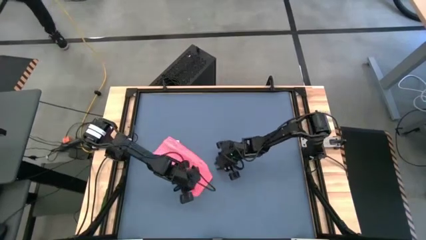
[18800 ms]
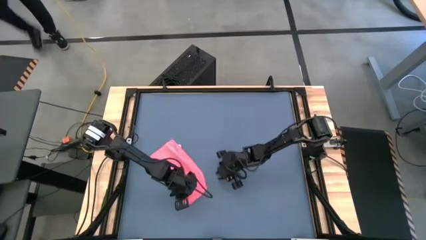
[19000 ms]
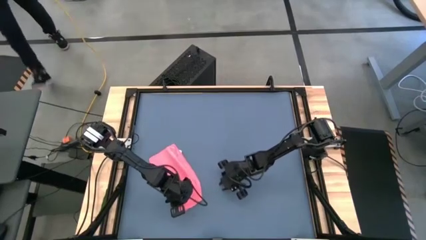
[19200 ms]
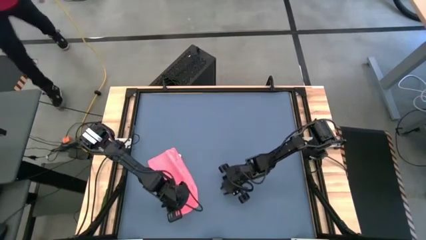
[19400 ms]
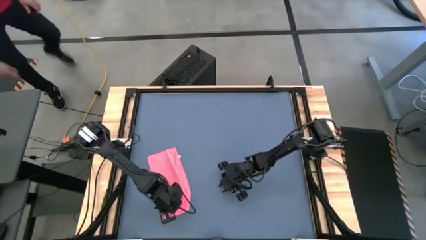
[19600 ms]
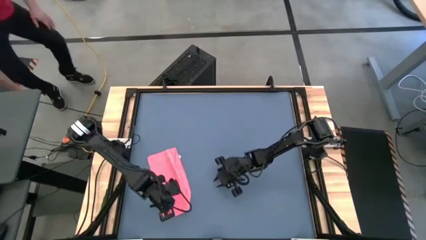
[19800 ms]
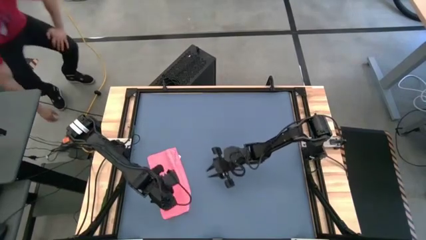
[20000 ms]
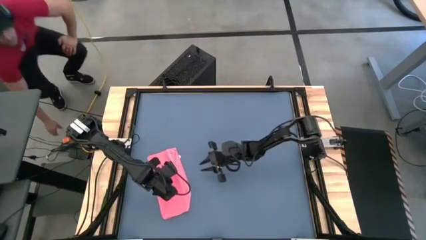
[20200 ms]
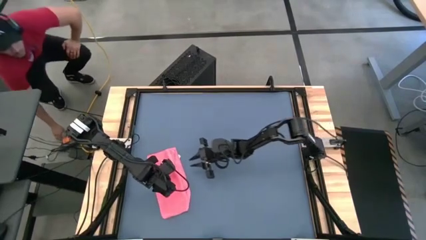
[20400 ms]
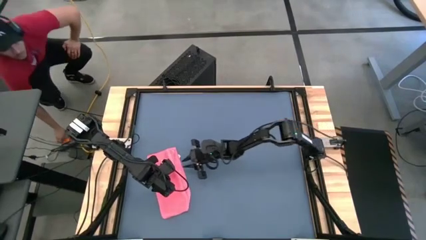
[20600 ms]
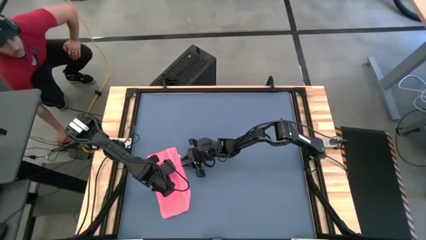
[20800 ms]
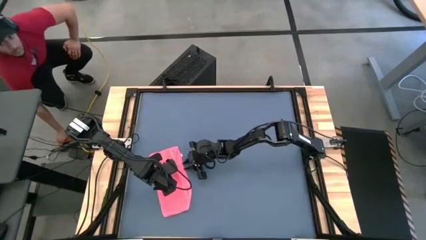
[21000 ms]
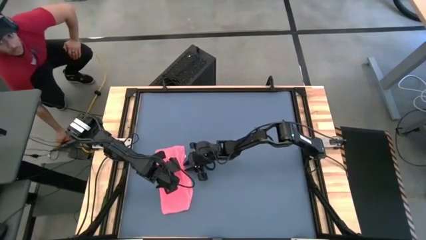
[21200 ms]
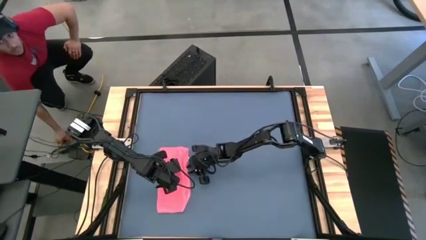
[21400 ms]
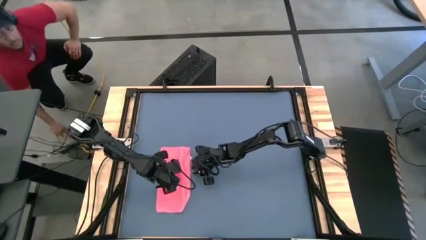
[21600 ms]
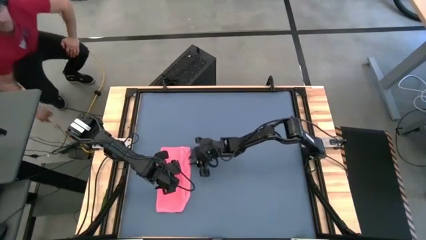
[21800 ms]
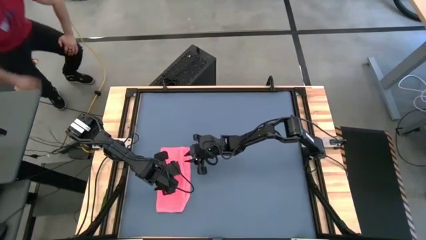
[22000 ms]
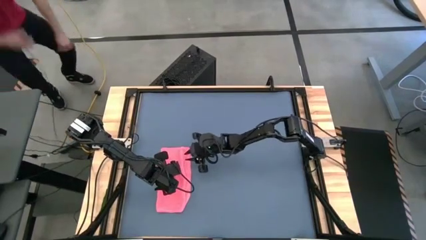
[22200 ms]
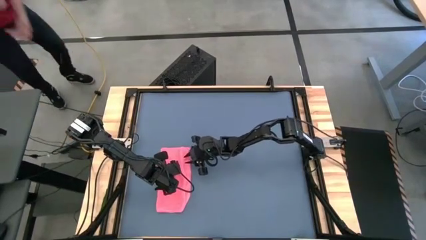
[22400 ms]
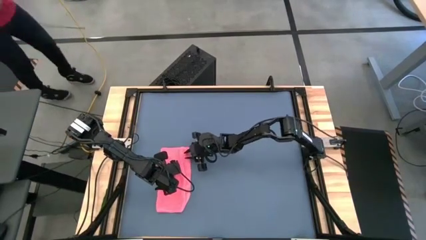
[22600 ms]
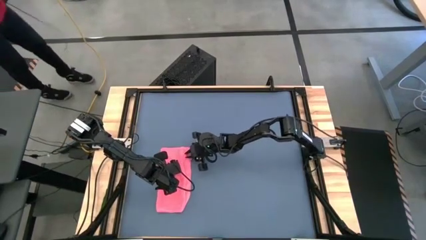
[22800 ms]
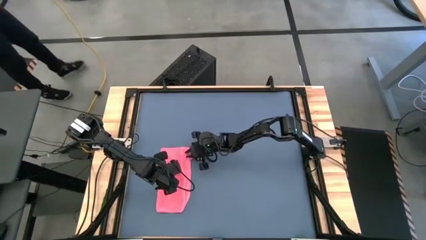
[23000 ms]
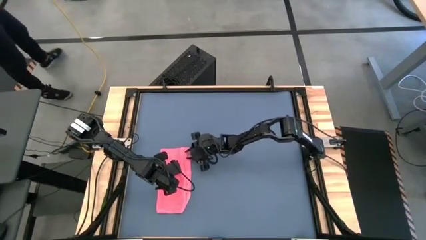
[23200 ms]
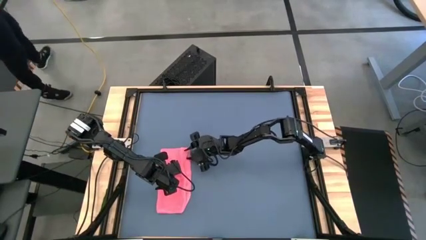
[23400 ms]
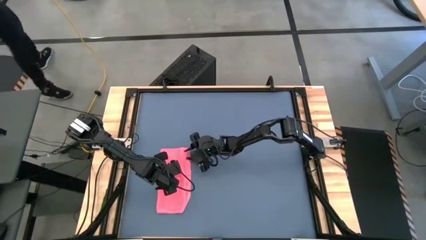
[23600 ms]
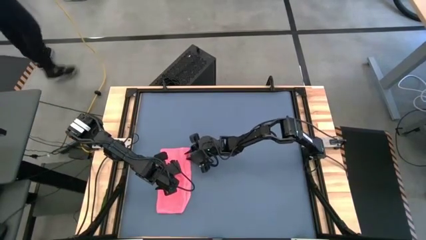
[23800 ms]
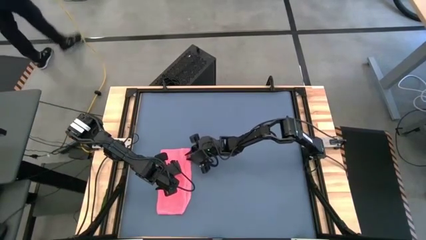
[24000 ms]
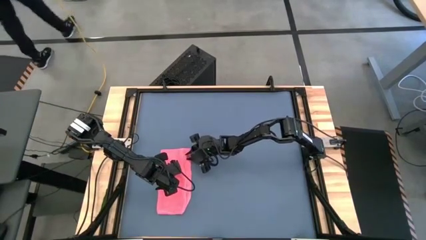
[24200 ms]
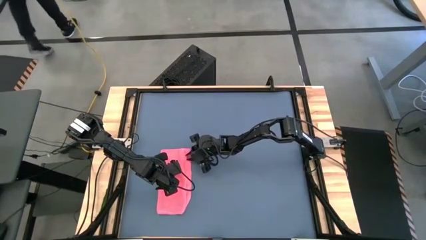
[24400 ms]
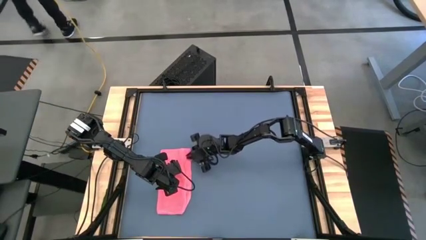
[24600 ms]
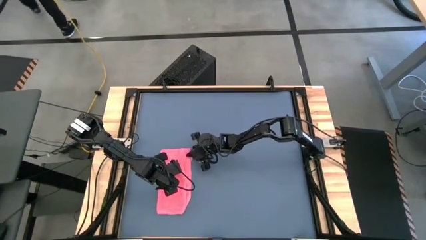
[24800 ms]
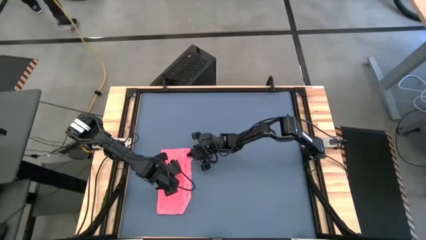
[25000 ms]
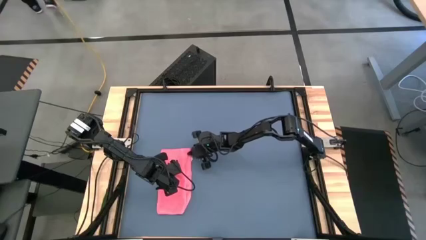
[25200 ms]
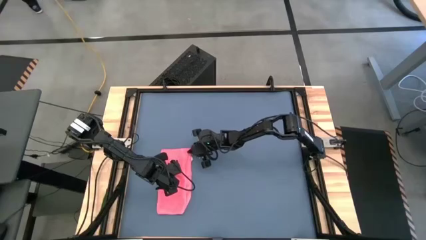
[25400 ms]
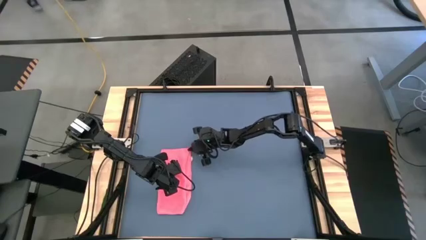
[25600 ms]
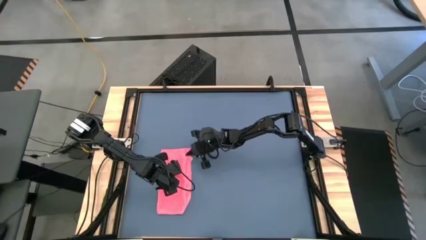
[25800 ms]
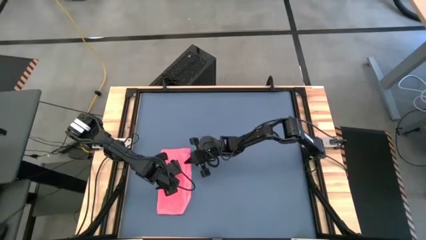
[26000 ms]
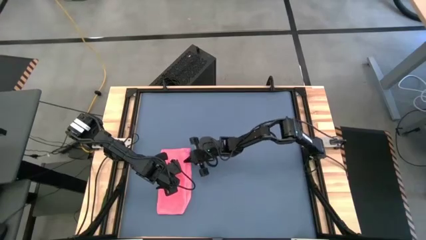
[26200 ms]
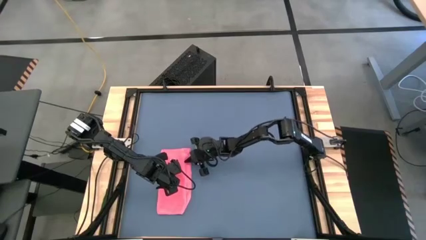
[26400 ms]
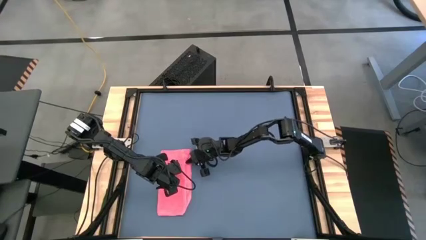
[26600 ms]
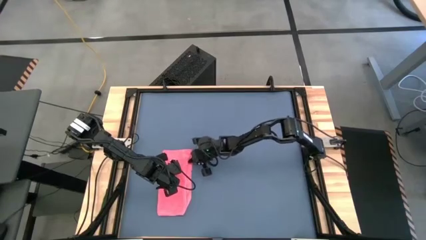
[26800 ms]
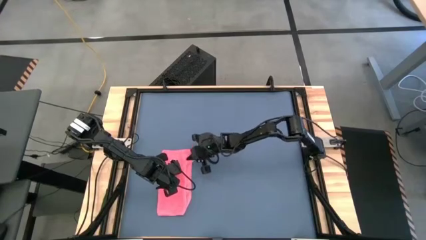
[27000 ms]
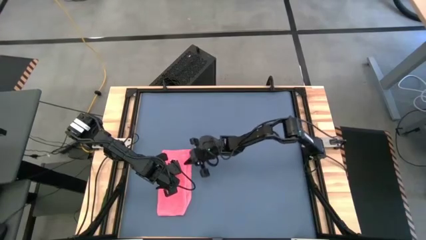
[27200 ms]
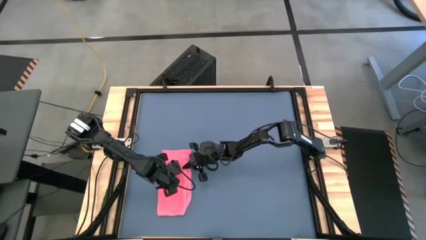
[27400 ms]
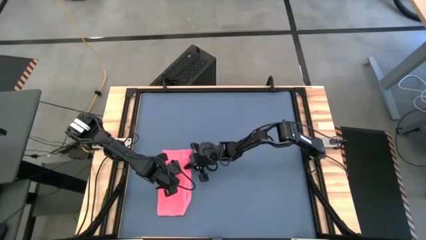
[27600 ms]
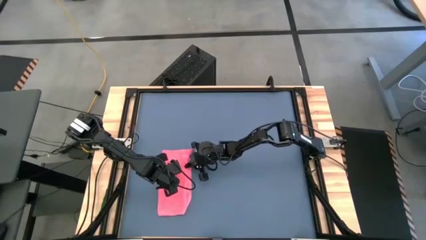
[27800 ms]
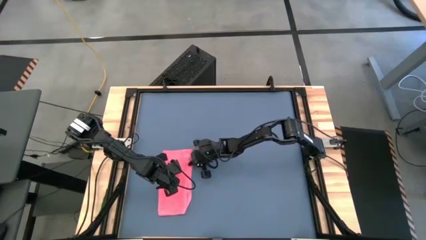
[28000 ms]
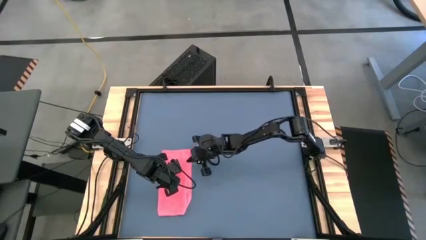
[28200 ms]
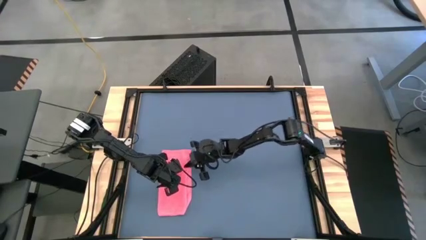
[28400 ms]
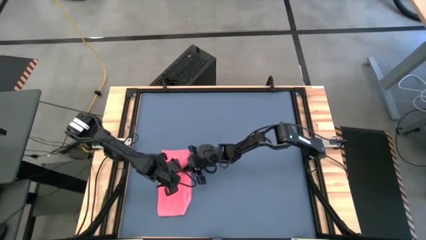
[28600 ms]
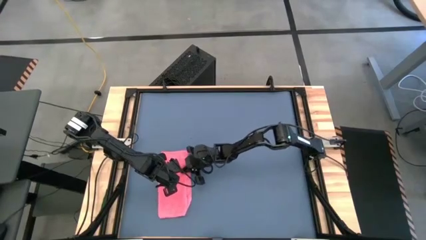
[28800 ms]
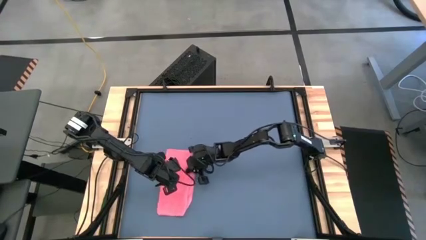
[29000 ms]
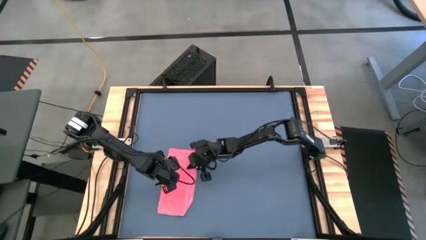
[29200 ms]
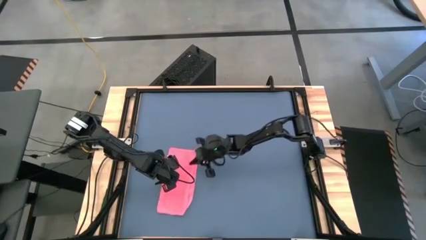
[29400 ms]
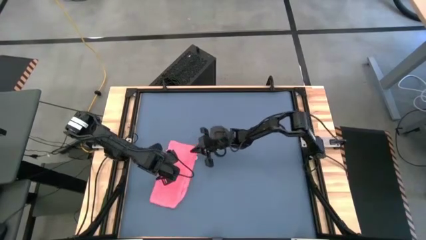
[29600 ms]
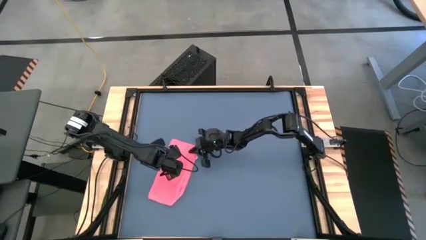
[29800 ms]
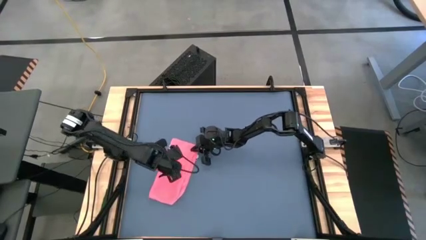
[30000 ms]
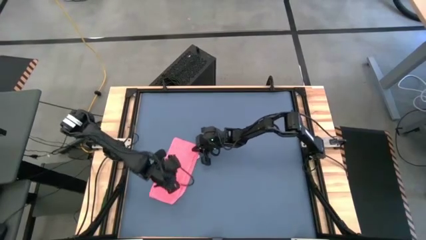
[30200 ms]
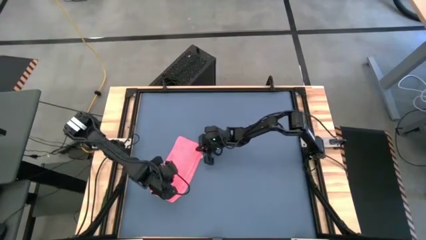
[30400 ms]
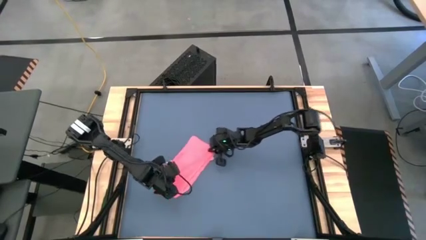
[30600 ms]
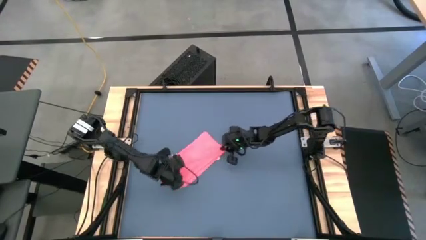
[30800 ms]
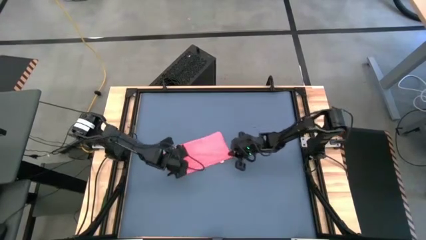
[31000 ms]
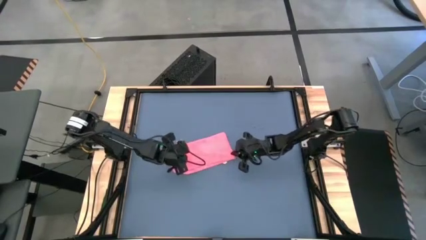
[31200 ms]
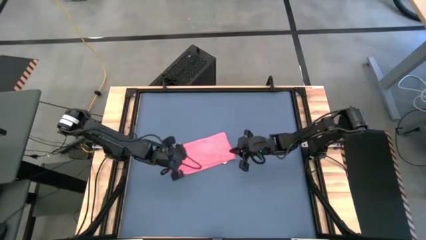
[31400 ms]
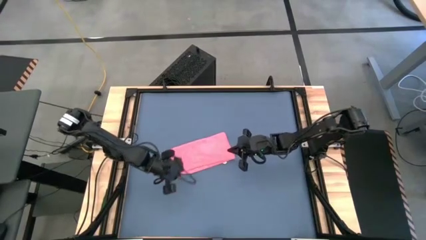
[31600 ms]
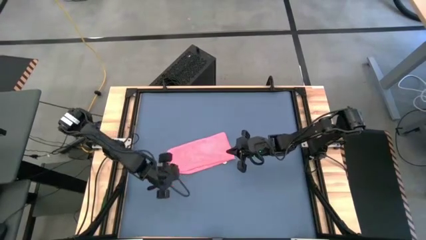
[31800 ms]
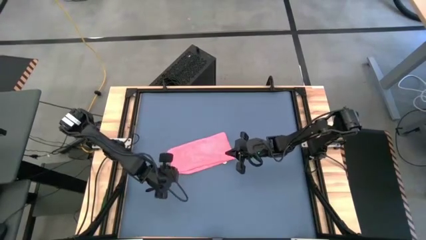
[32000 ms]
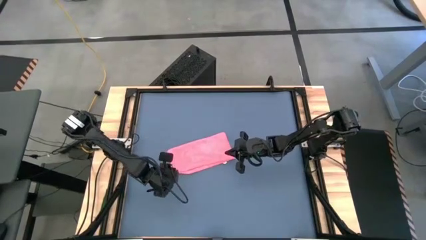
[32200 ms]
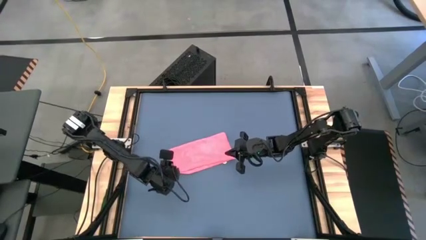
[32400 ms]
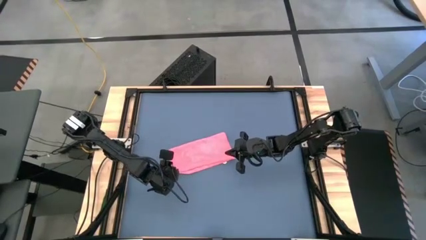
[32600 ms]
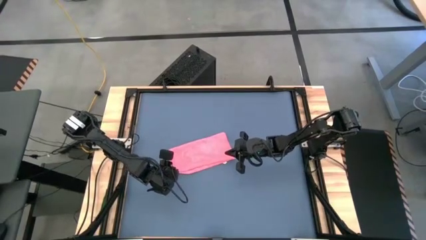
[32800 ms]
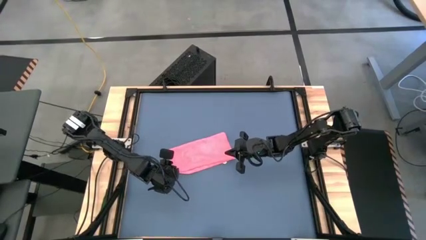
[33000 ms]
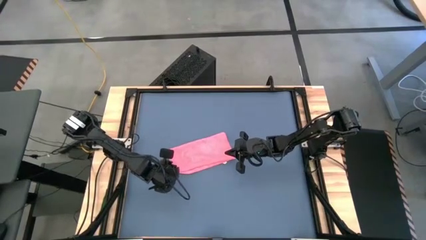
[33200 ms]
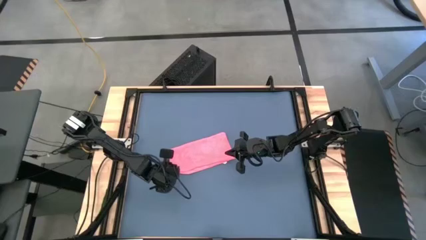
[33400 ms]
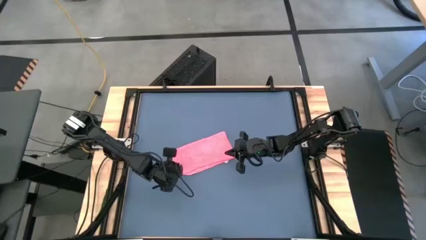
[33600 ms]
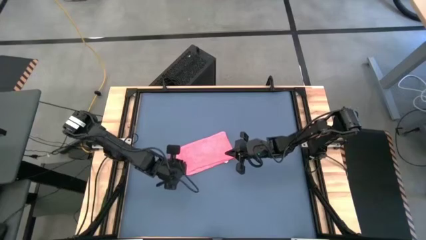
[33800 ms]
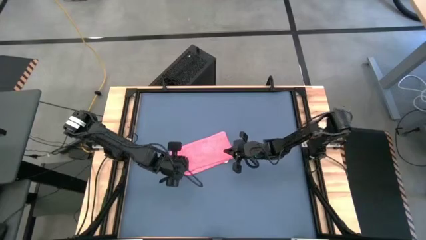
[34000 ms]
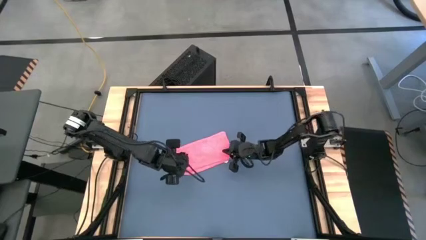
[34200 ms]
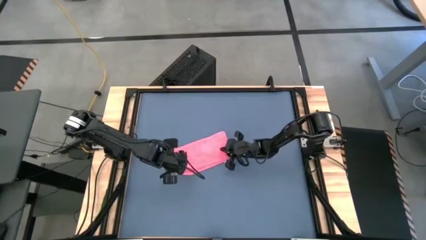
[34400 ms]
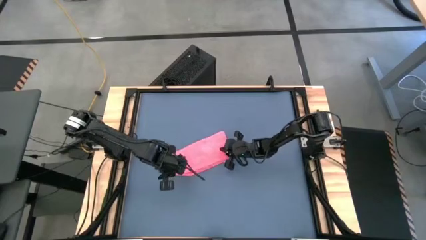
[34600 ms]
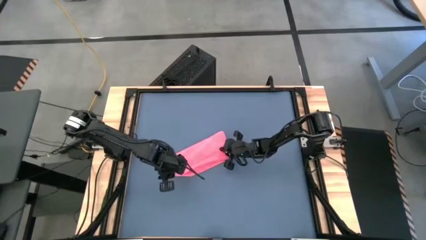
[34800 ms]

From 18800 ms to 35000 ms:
Task: Roll towel
Fold the microfiber towel

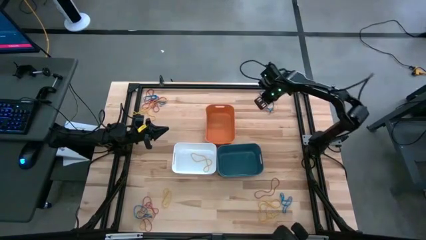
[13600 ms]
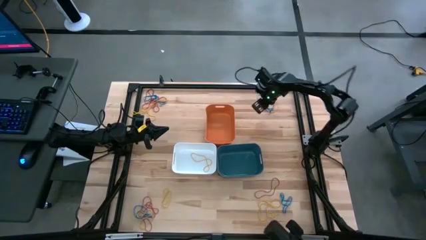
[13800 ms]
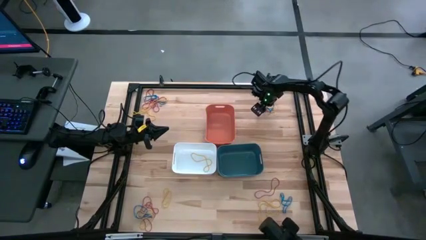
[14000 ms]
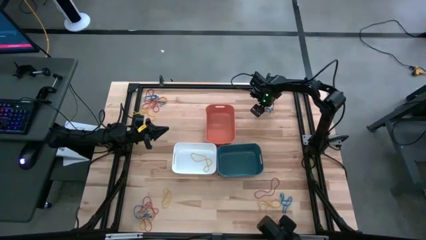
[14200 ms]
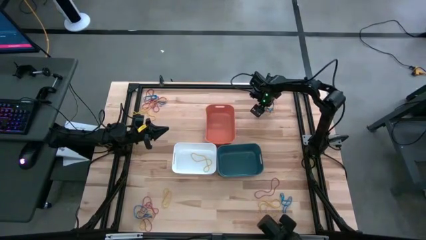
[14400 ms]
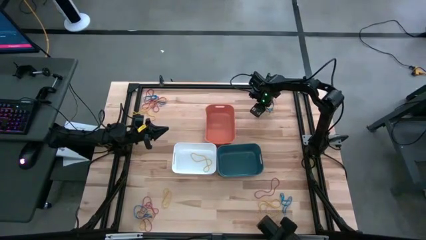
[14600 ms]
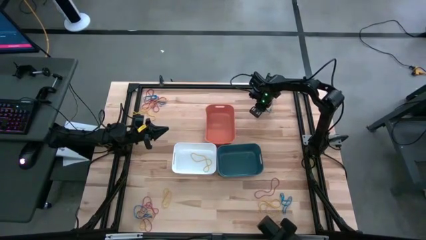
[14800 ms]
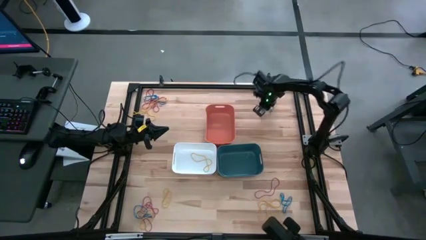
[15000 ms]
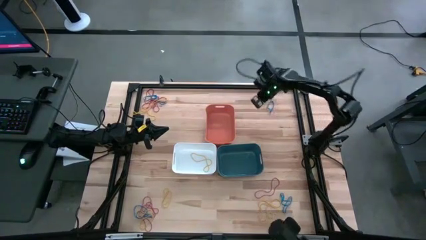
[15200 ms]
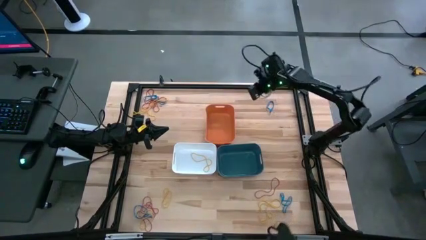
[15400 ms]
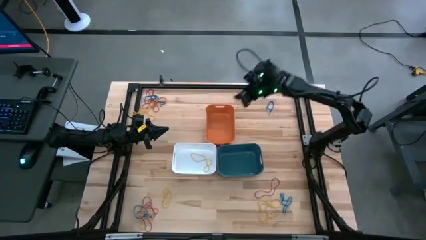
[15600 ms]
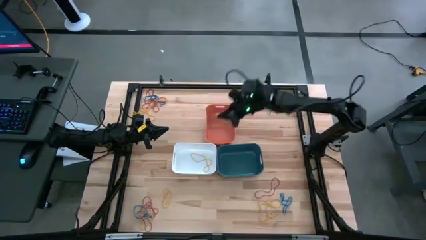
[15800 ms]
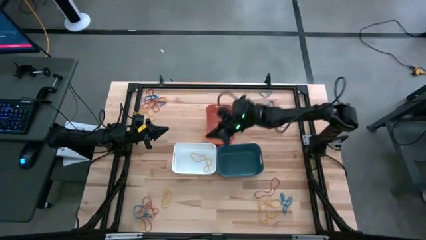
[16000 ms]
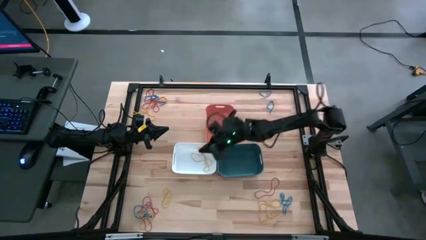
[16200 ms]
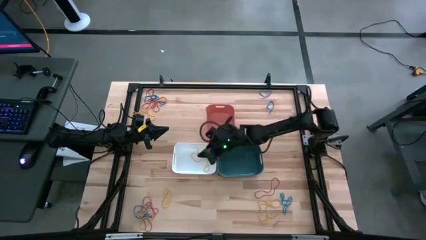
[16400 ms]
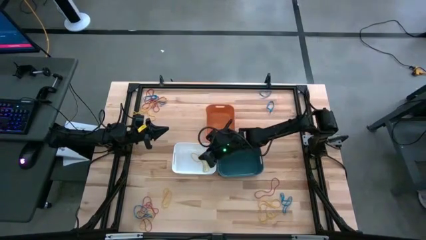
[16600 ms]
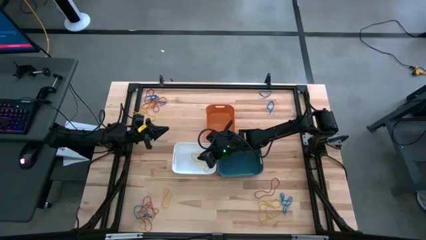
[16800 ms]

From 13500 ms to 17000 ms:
Task: Sort rubber bands into baskets
Put the yellow rubber band into the white bin
